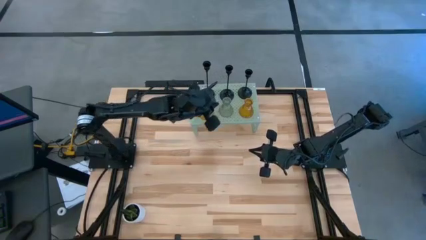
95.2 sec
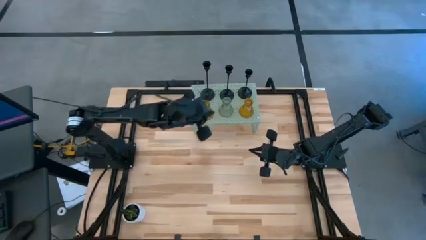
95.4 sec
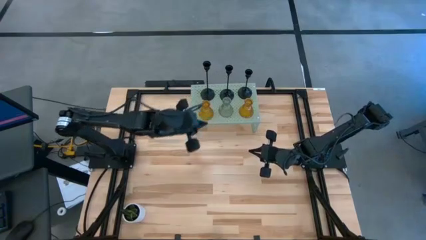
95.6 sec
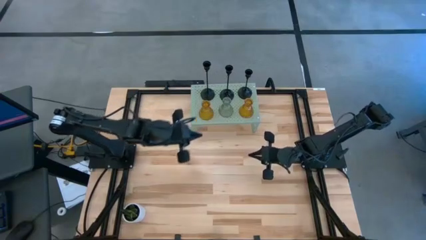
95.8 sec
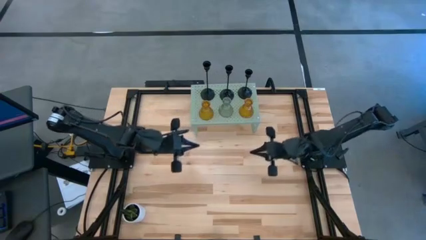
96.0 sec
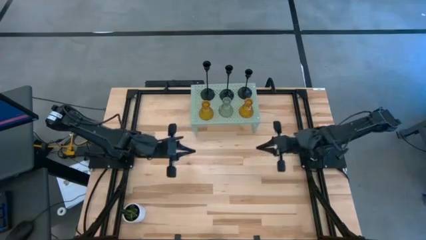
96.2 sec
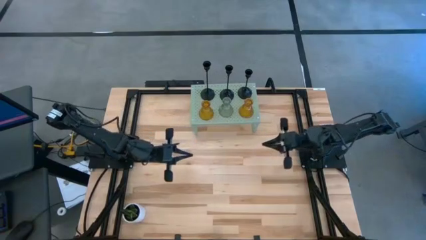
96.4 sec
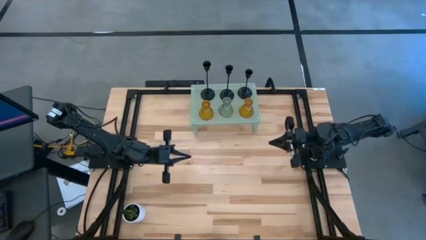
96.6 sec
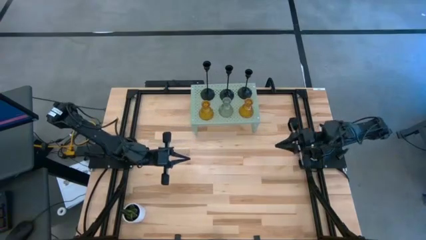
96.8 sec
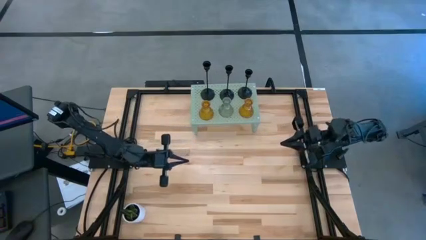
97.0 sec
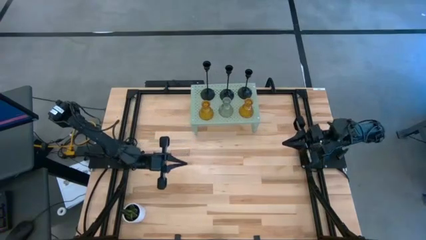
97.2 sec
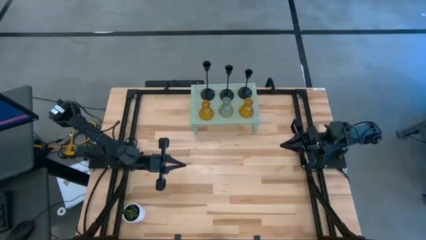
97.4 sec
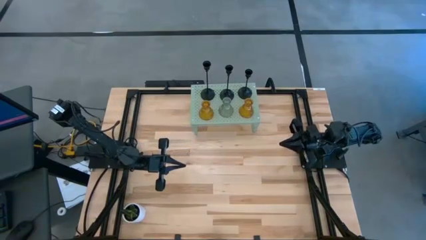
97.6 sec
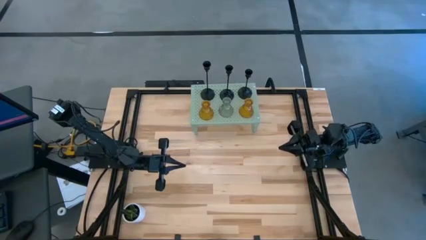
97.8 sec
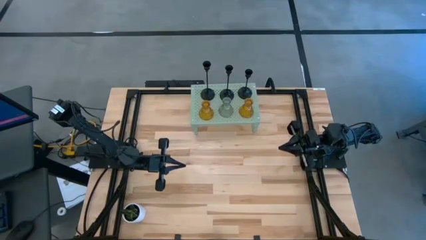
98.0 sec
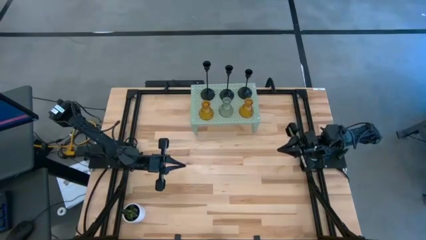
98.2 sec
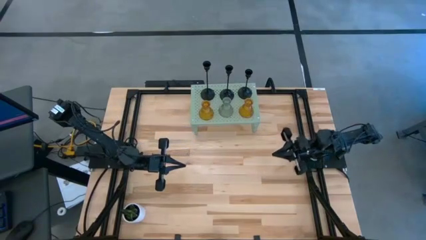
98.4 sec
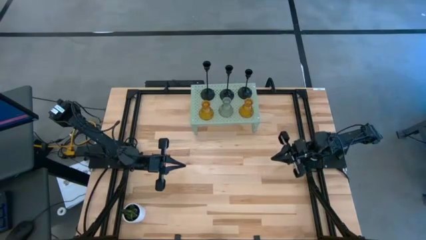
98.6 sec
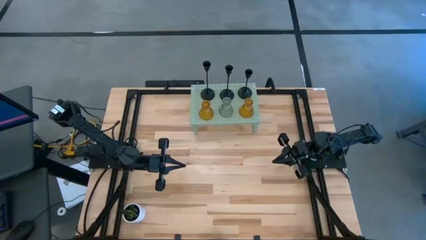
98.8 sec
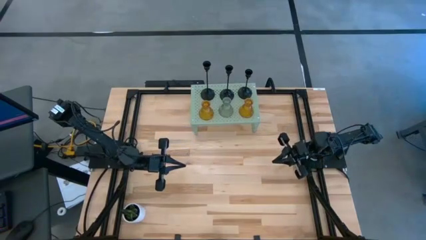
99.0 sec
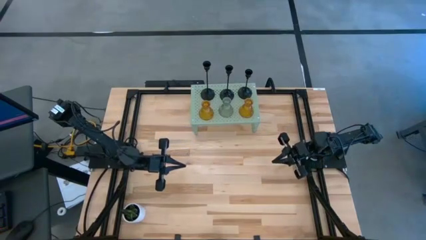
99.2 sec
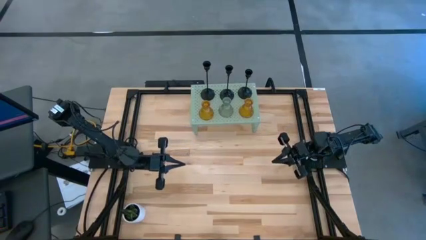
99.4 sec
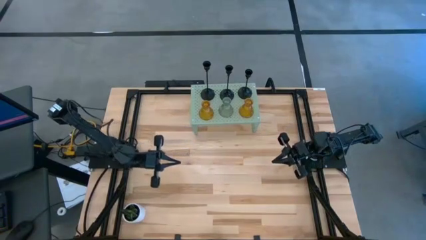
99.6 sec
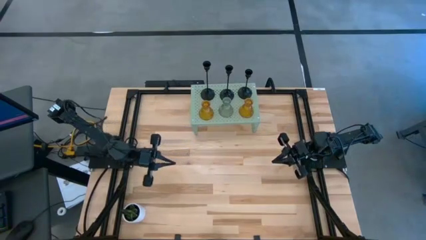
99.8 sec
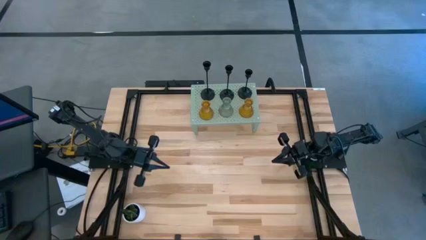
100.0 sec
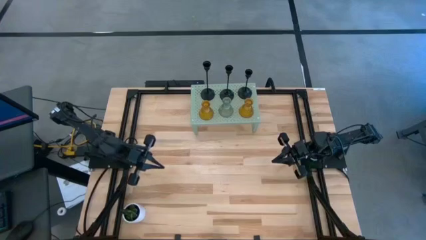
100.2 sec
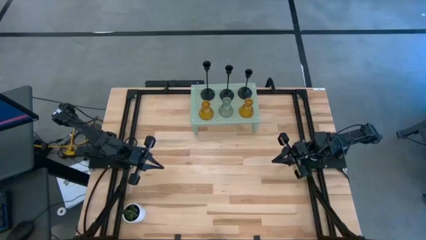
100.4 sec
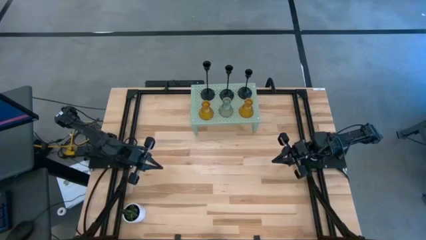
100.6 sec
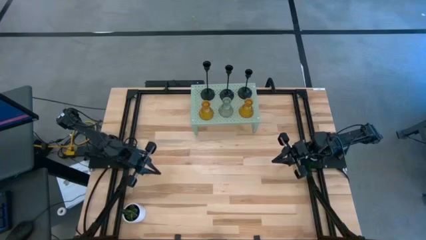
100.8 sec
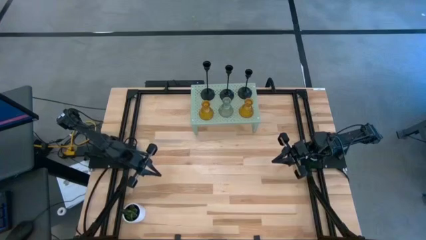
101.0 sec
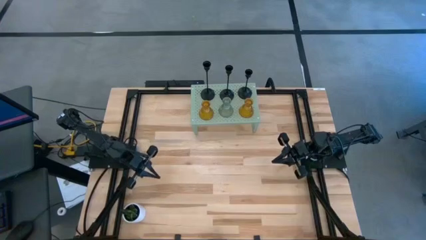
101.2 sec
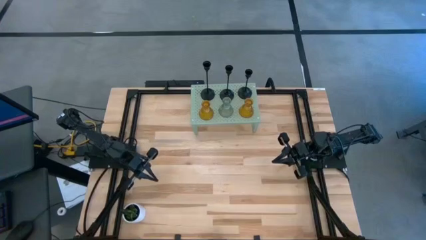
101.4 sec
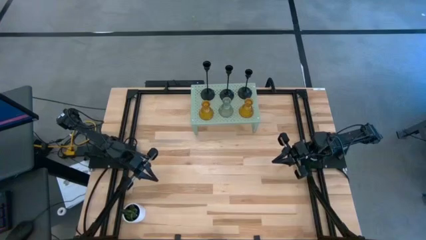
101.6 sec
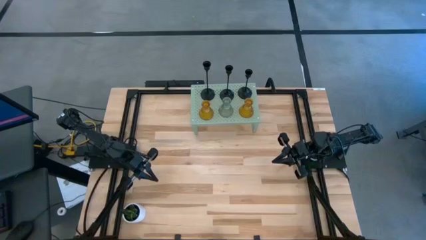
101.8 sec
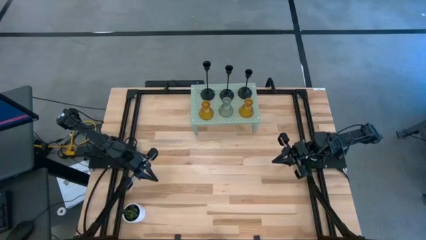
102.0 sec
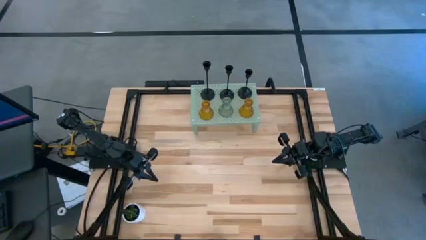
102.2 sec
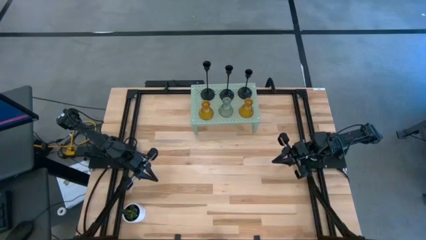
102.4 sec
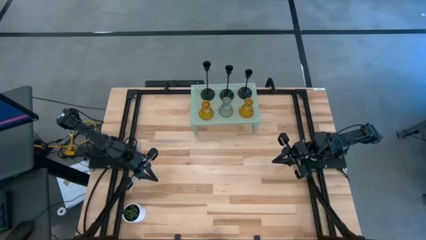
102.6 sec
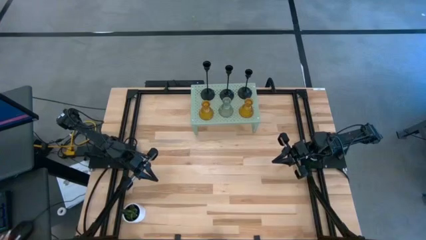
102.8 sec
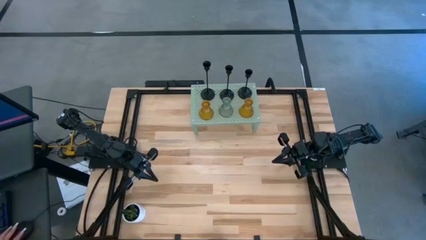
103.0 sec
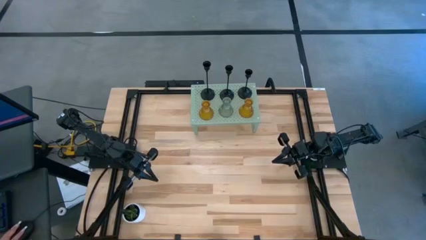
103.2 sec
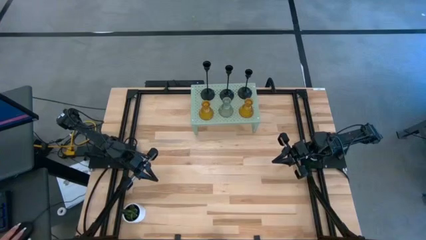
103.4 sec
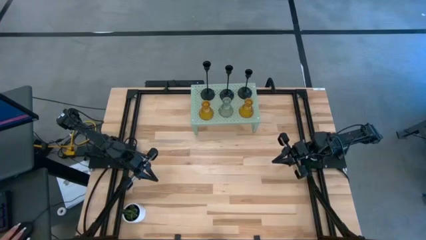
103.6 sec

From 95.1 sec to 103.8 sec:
Task: Pick & Place candle stick holders
Return to Home Position

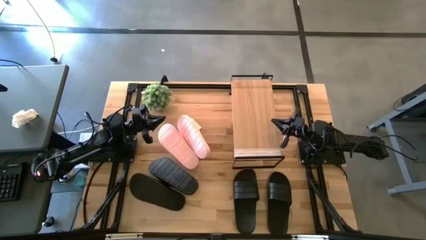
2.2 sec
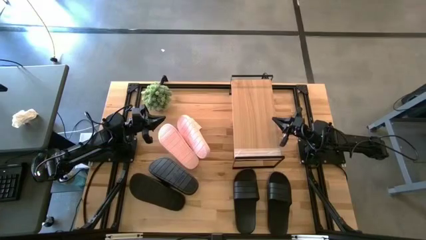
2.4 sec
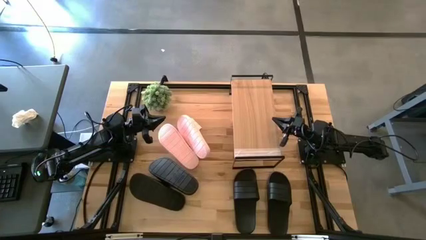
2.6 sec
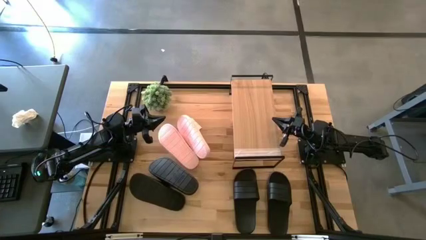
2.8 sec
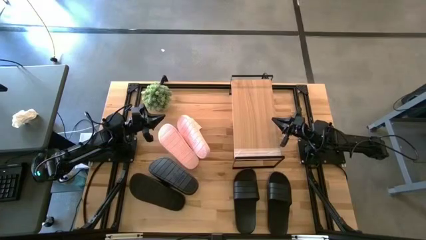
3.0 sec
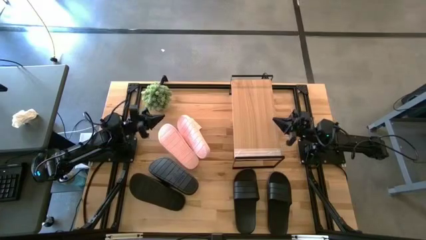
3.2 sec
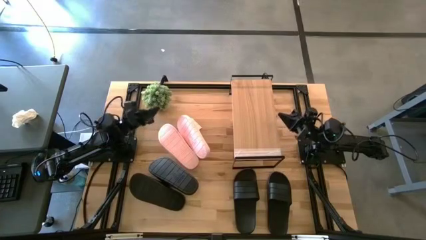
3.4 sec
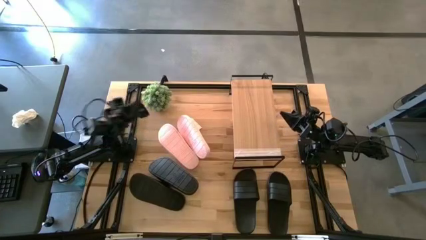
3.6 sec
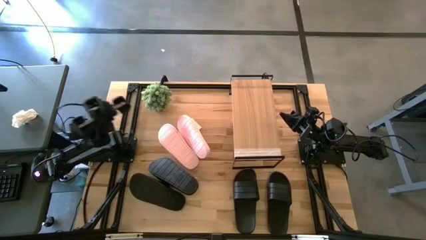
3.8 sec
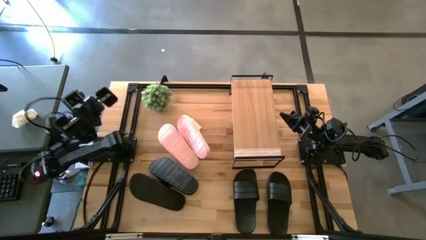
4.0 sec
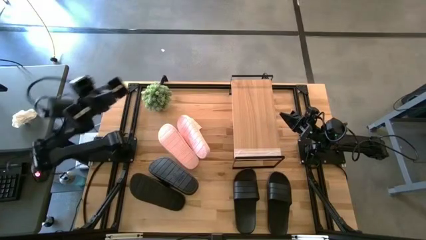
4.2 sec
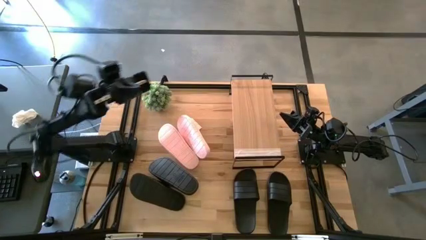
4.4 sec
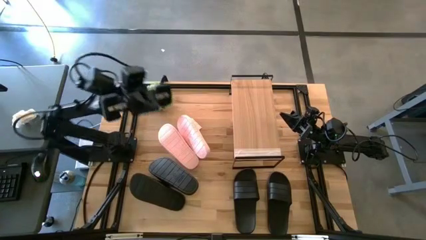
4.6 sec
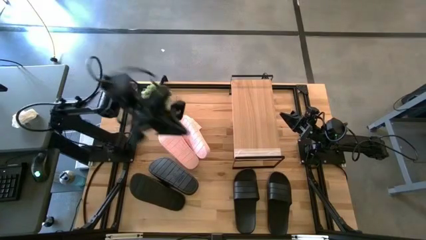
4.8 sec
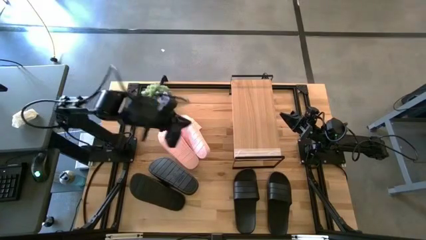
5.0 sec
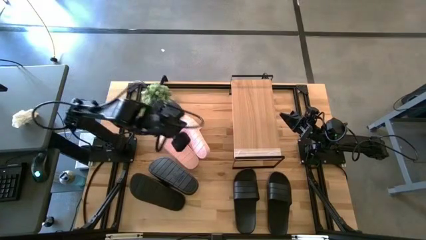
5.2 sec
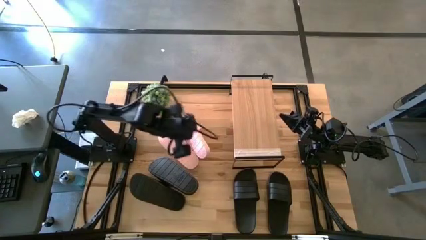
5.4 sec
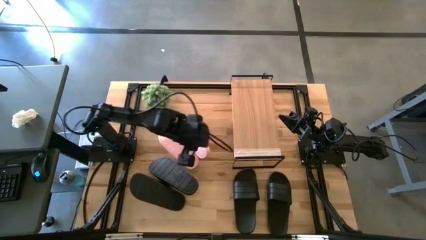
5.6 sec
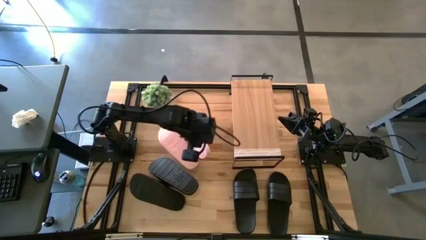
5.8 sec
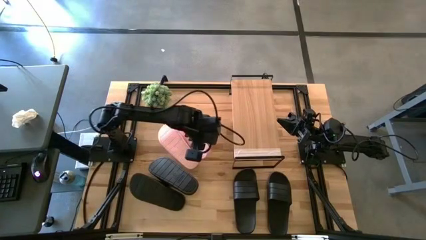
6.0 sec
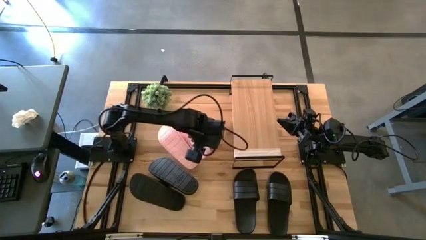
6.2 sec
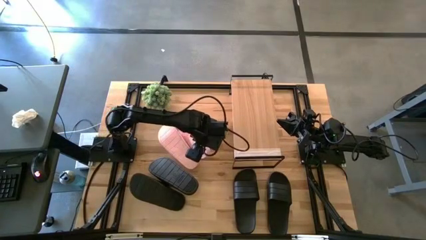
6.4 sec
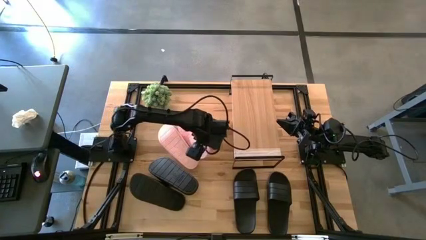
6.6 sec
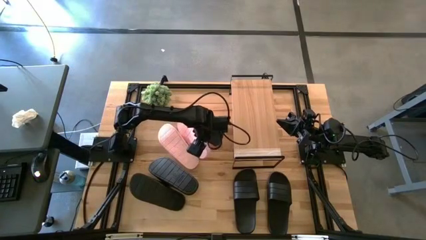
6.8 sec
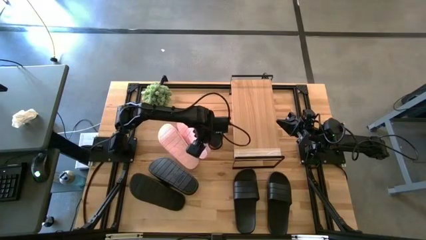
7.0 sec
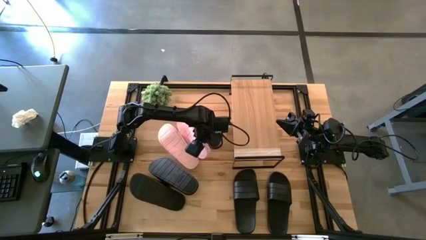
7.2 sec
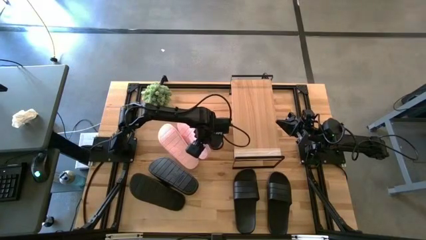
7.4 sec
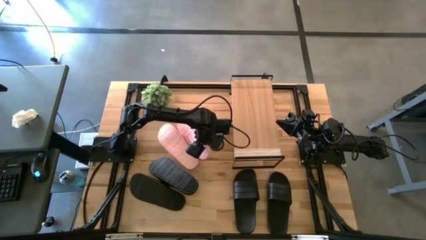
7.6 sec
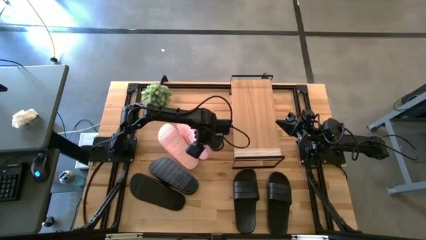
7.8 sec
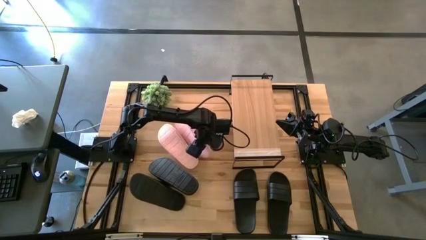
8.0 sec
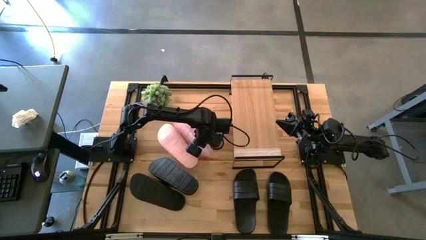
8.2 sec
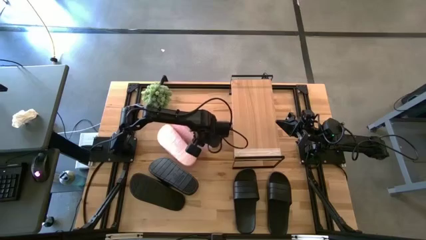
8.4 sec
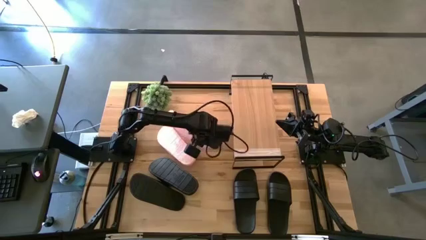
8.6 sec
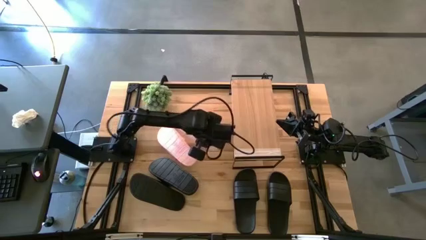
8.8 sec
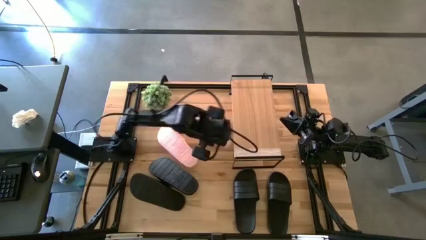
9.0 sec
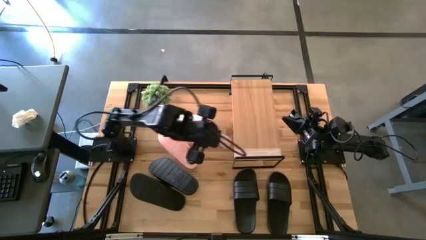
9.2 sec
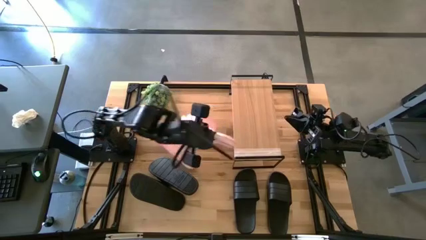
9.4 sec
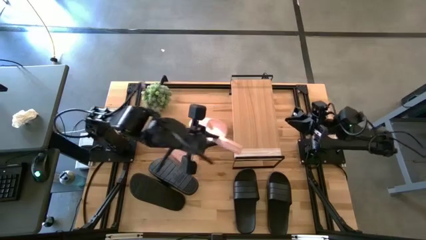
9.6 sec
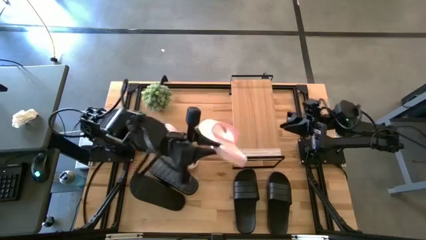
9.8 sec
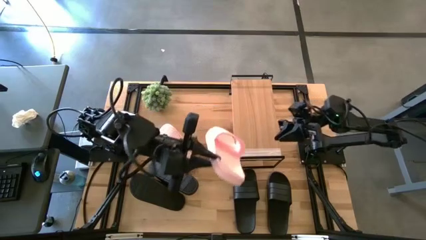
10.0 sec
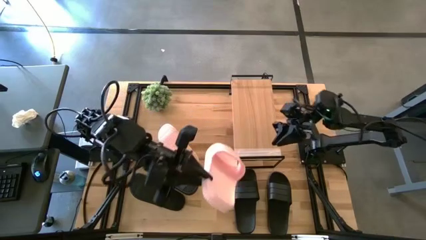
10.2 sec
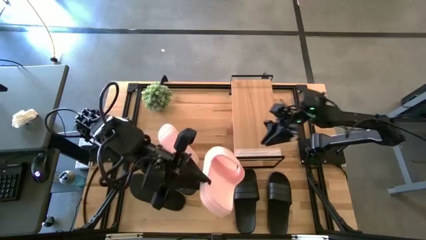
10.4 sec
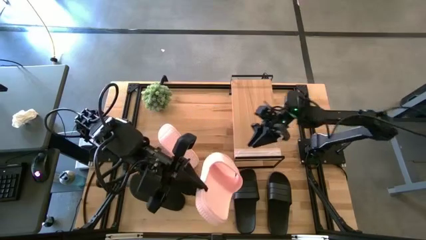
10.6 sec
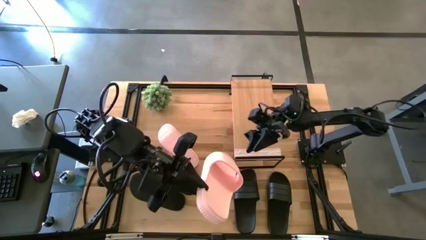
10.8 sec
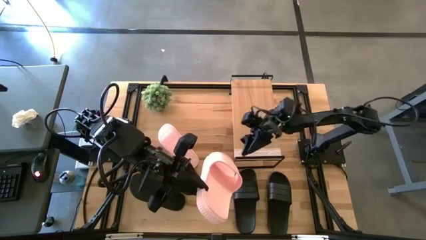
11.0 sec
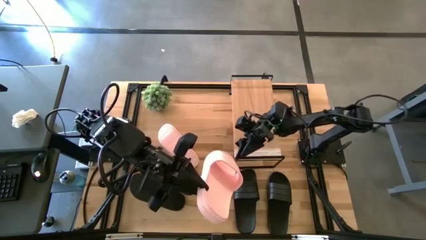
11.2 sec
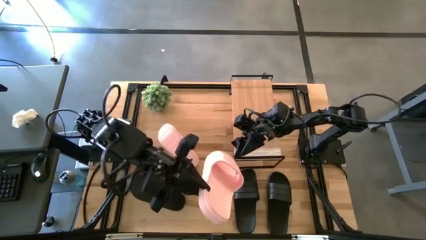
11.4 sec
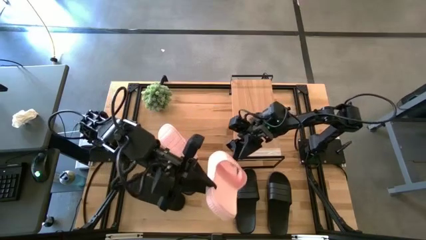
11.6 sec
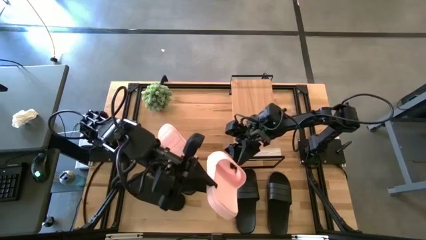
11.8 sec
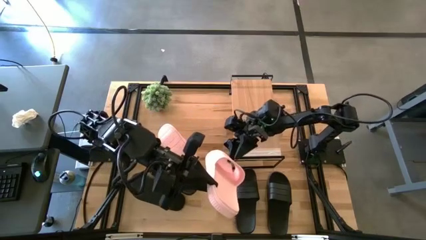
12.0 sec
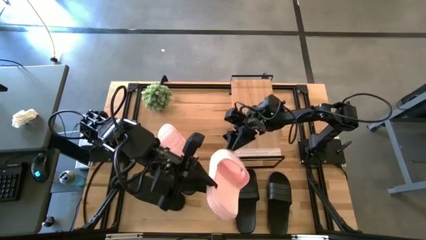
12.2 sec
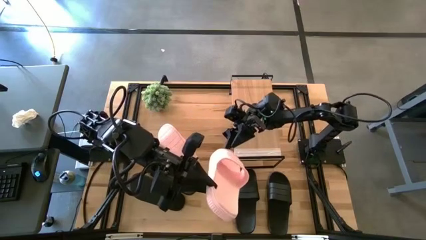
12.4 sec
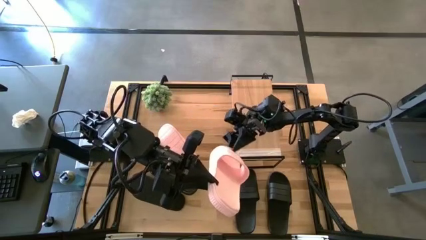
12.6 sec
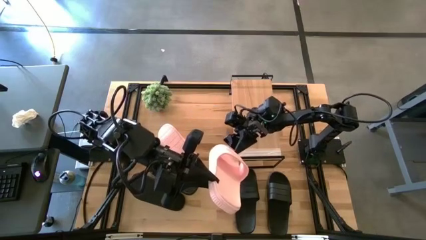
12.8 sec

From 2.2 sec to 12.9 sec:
Task: Pick and place slides into the shelf
Put the pink slipper under the shelf
